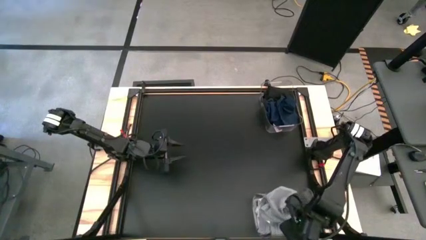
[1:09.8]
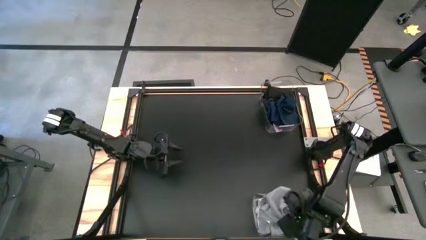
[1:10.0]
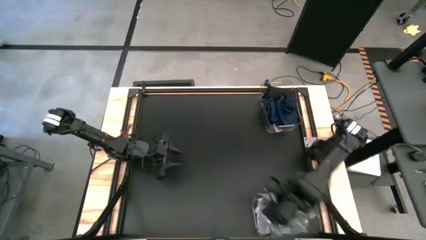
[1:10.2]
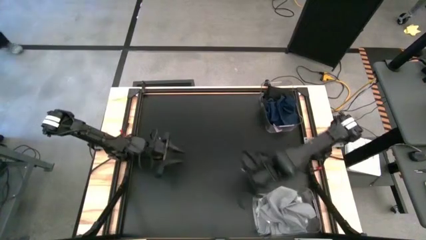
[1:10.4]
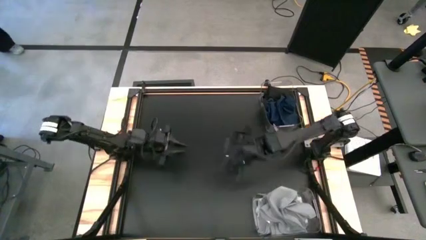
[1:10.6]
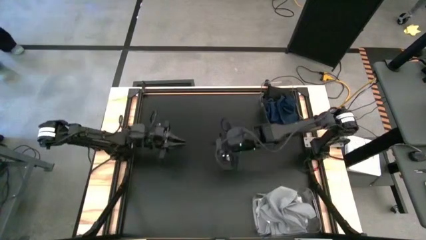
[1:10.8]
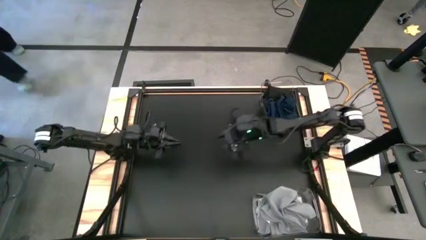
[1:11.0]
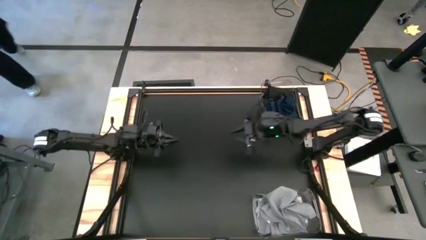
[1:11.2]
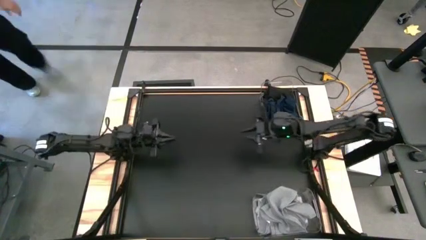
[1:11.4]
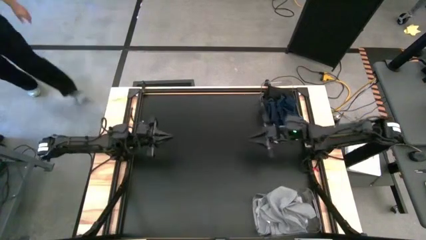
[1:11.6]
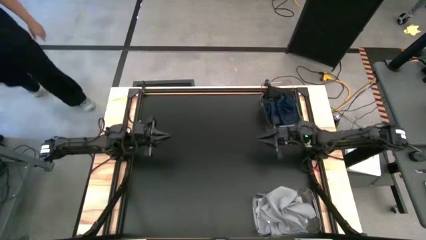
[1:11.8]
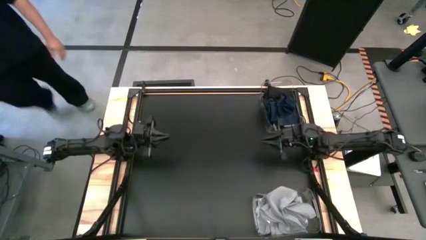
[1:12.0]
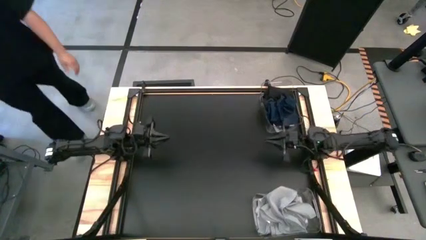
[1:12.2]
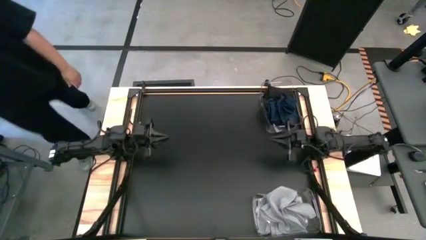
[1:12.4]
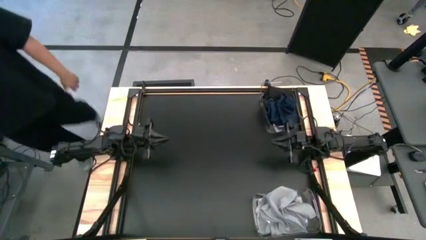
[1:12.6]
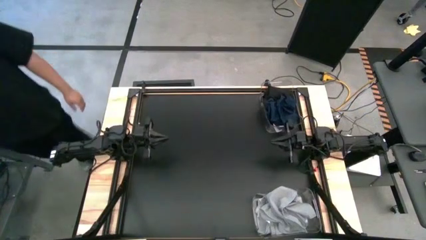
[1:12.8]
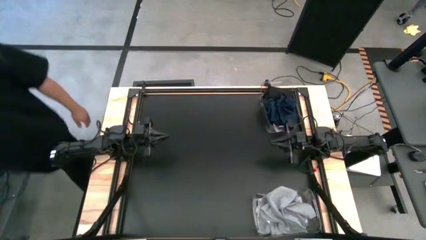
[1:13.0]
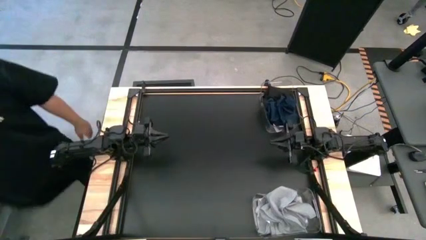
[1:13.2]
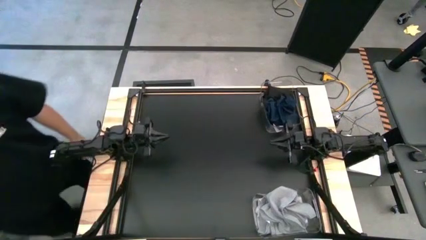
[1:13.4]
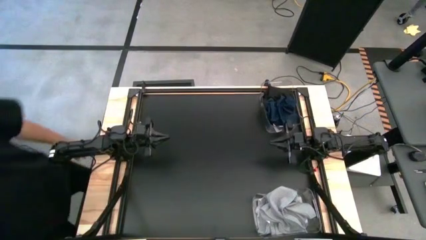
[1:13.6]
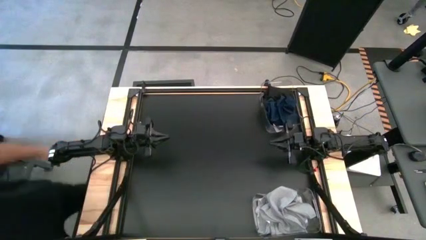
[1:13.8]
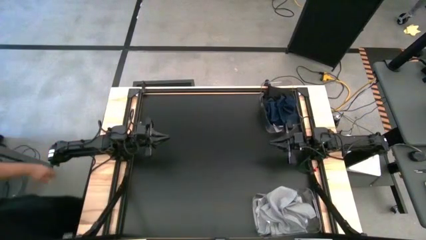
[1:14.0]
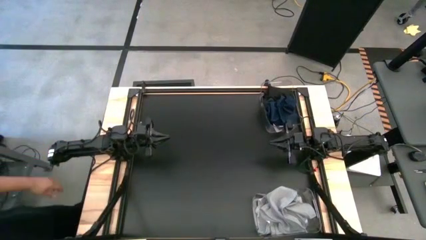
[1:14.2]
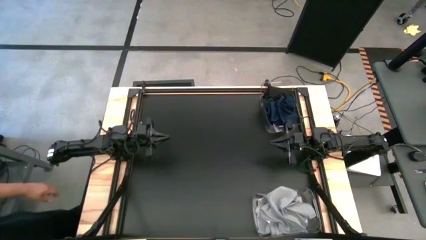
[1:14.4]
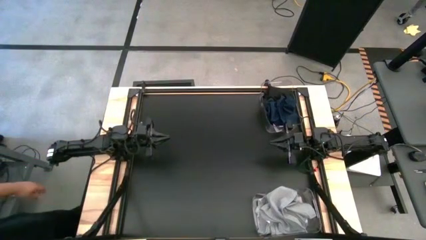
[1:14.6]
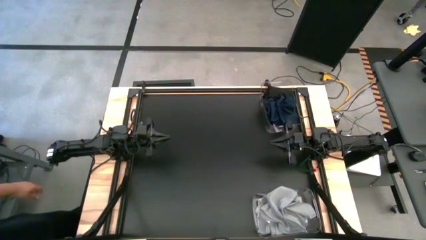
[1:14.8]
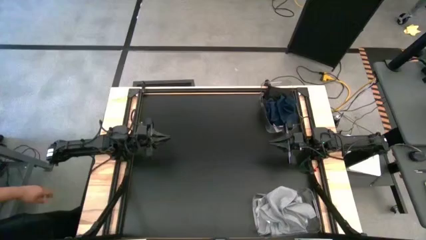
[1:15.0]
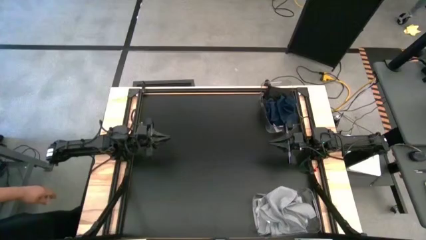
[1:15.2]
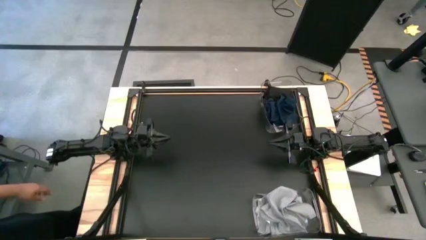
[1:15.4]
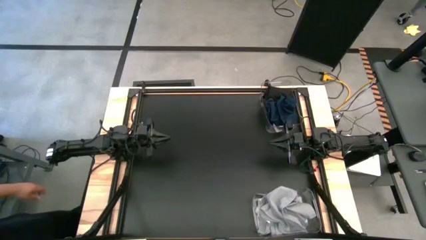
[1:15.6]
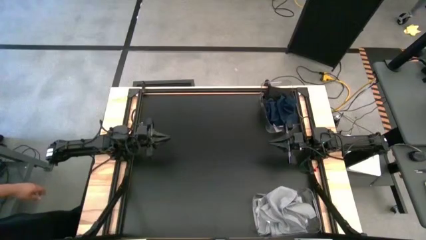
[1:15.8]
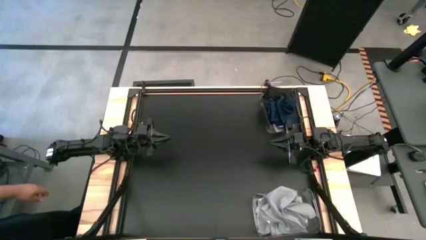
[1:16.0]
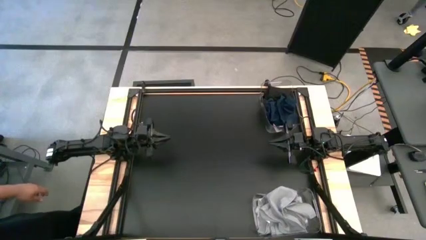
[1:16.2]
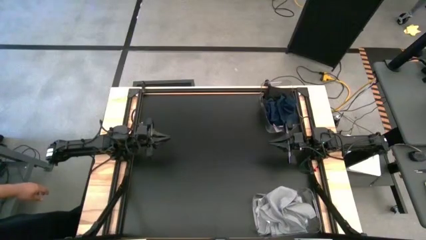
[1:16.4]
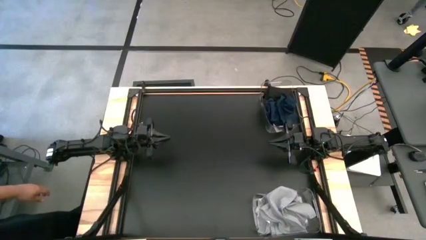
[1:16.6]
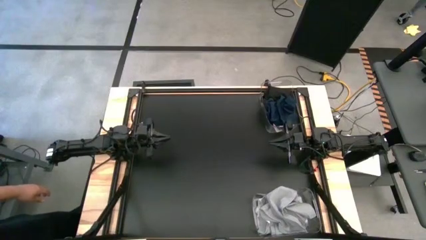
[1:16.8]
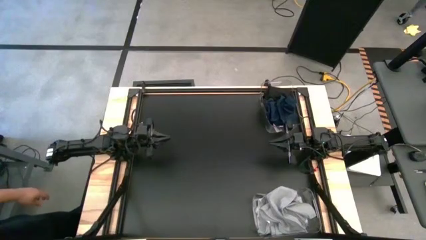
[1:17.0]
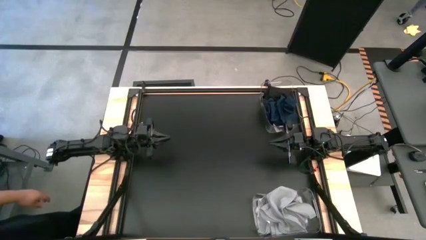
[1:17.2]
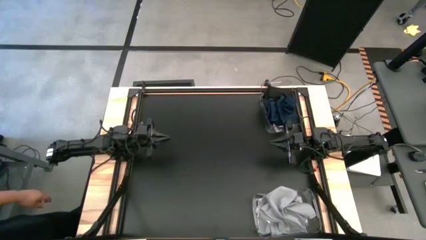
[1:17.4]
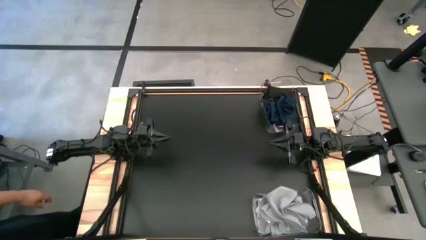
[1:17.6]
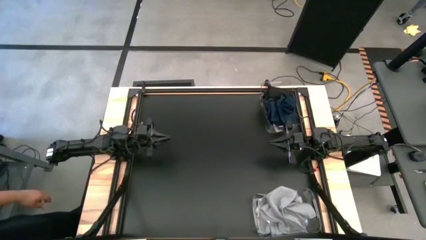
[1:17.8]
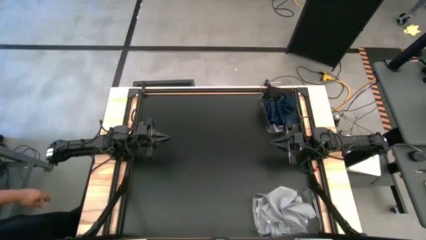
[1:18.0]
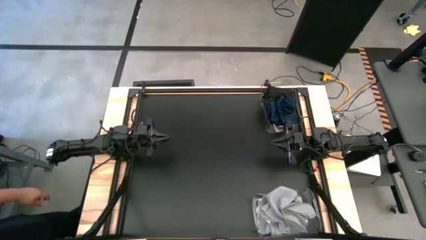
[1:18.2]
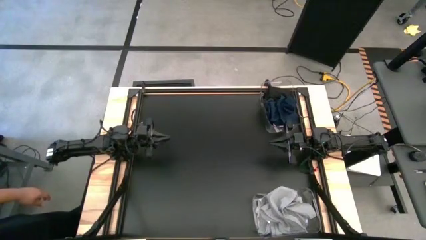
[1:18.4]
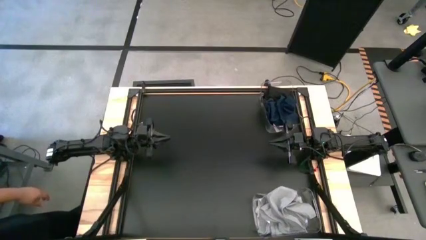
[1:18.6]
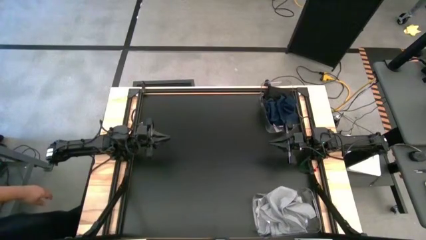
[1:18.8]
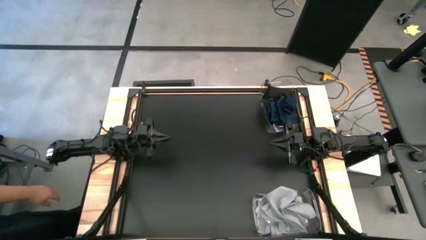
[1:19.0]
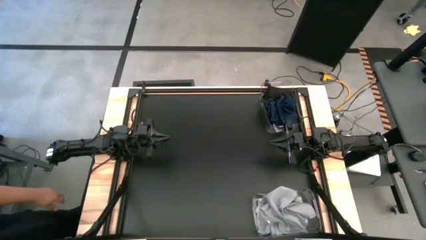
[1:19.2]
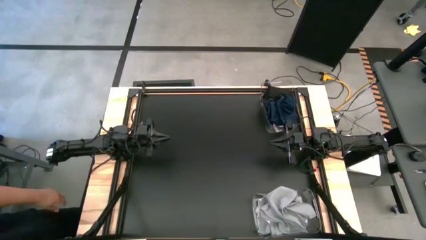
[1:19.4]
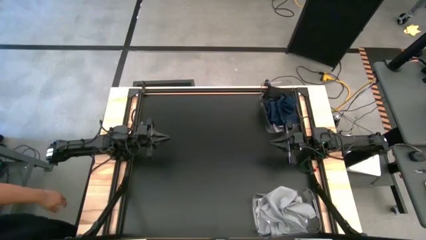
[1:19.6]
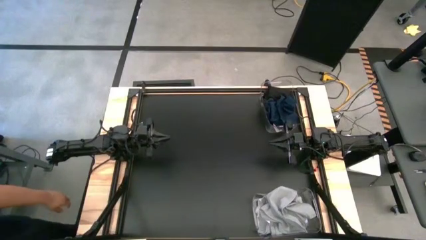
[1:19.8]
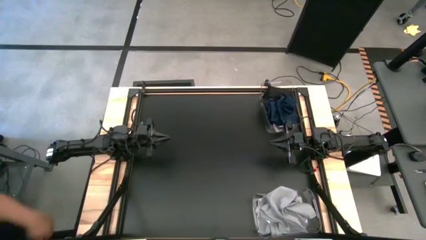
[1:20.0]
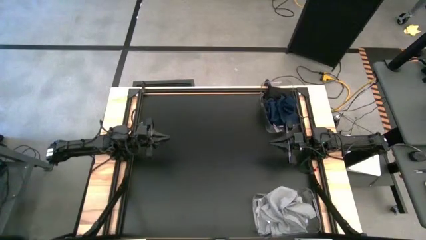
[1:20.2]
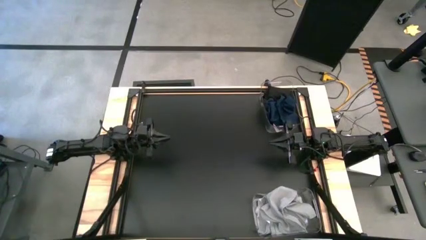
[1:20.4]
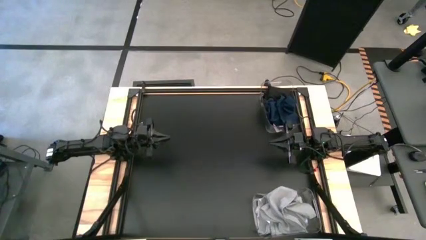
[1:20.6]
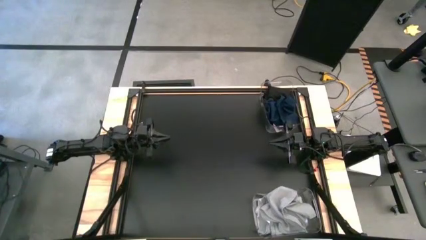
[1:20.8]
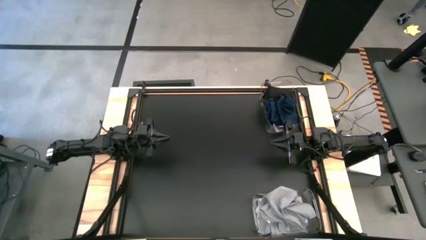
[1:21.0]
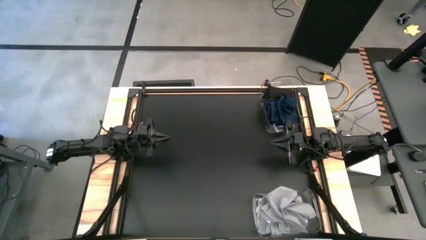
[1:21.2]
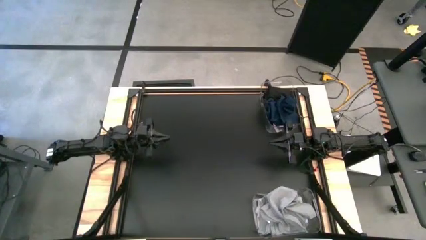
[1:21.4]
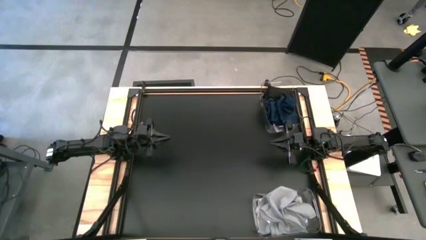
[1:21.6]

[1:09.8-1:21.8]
Task: Sort towels by color in basket
Return to Home Position
